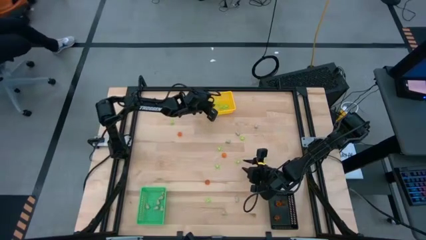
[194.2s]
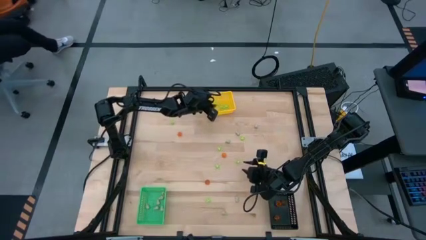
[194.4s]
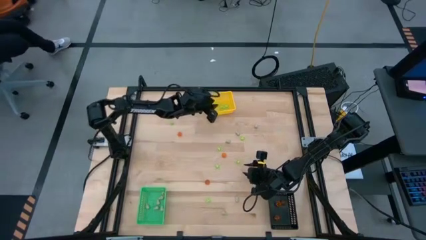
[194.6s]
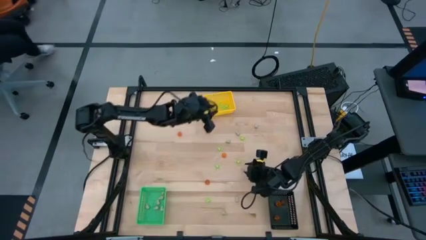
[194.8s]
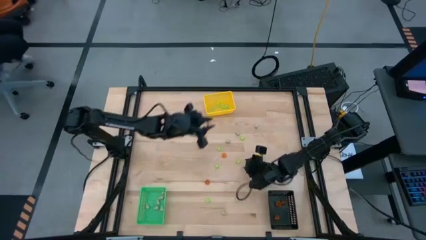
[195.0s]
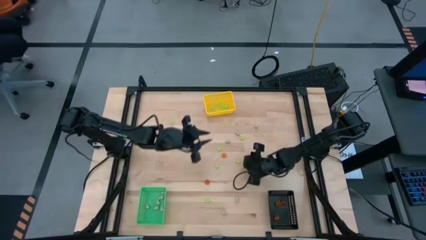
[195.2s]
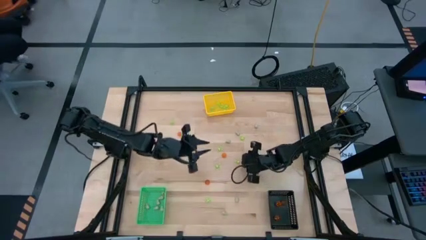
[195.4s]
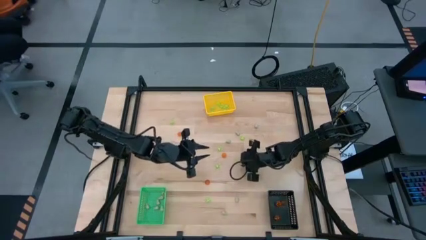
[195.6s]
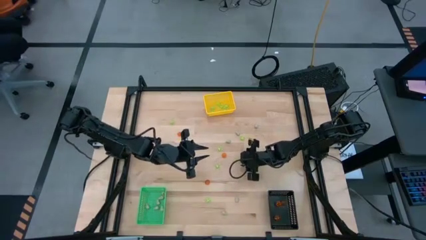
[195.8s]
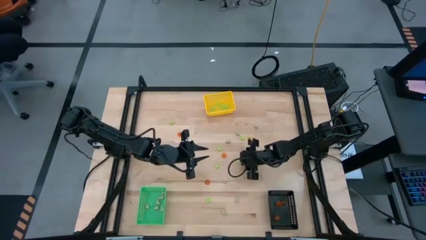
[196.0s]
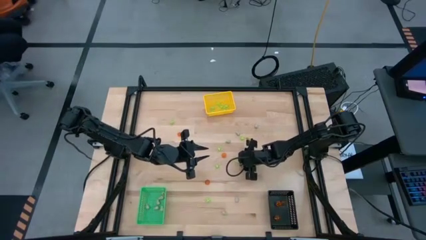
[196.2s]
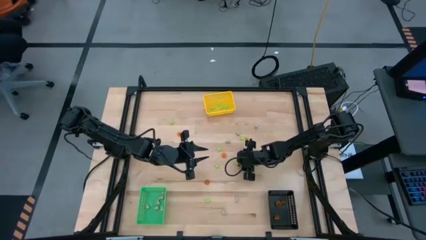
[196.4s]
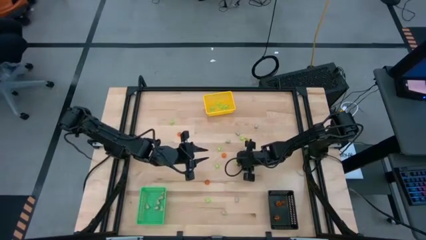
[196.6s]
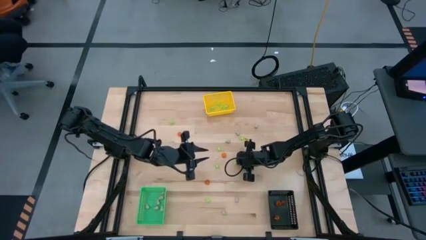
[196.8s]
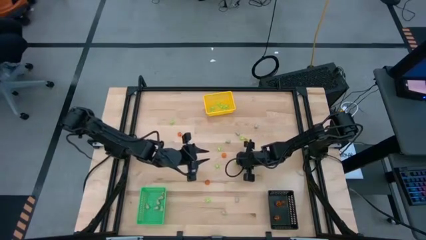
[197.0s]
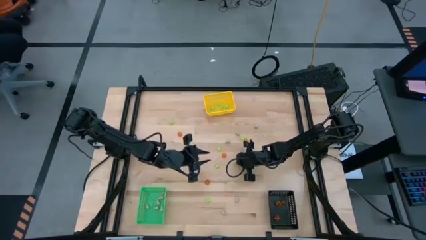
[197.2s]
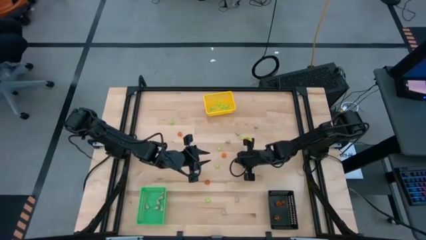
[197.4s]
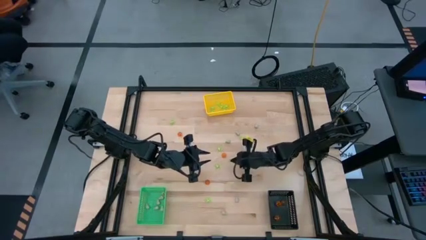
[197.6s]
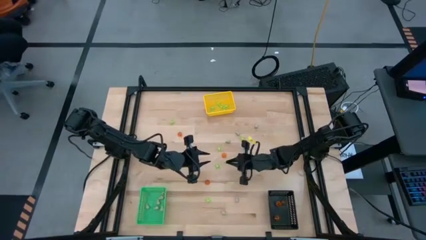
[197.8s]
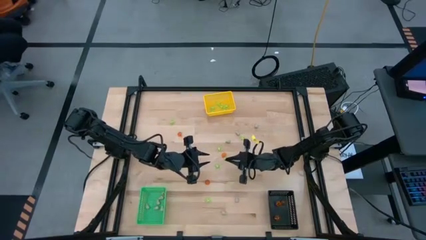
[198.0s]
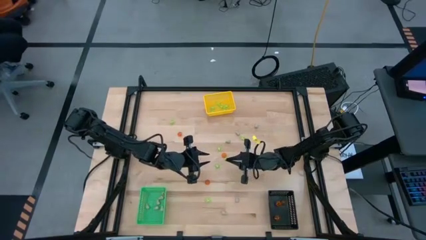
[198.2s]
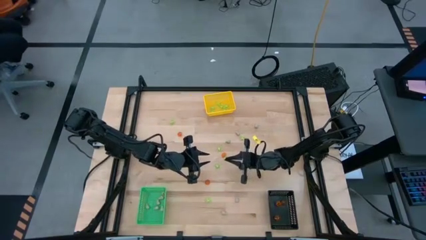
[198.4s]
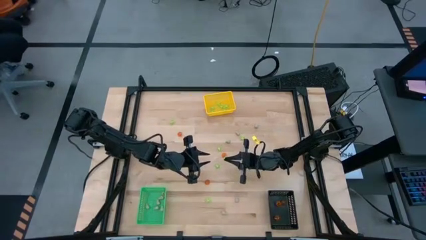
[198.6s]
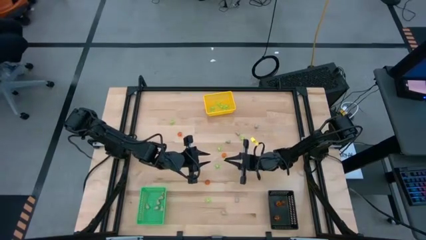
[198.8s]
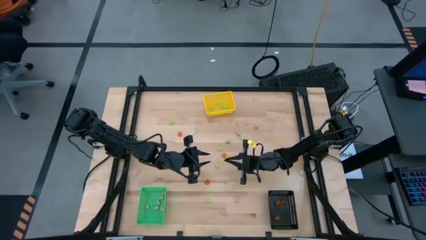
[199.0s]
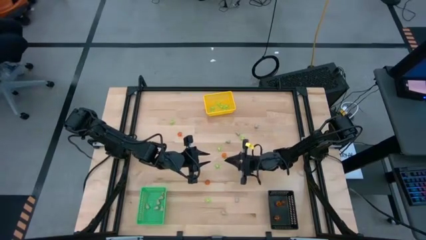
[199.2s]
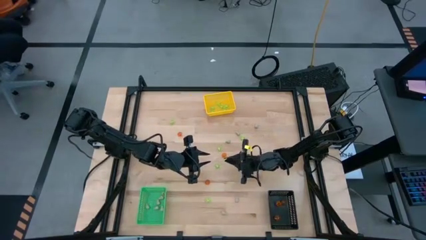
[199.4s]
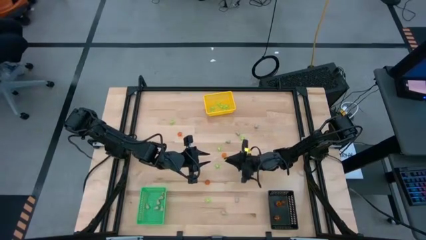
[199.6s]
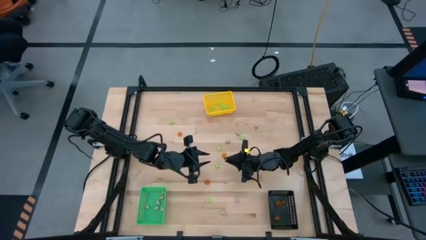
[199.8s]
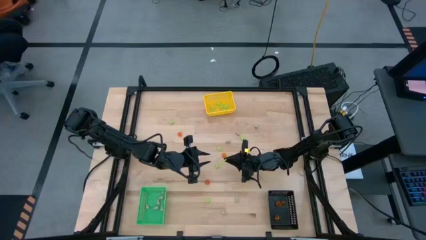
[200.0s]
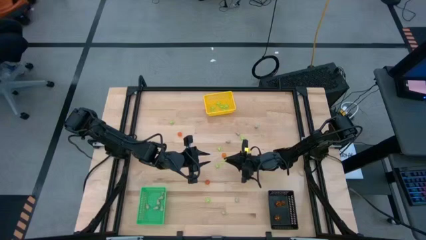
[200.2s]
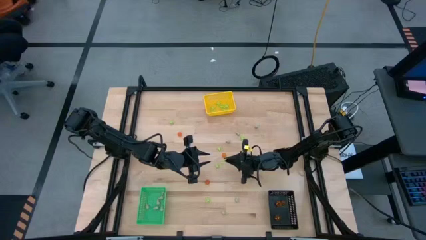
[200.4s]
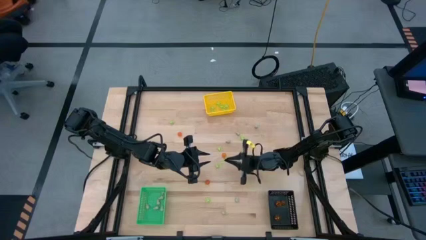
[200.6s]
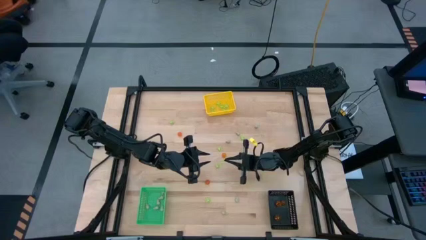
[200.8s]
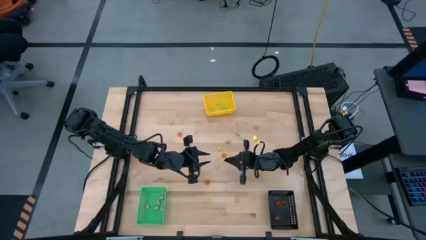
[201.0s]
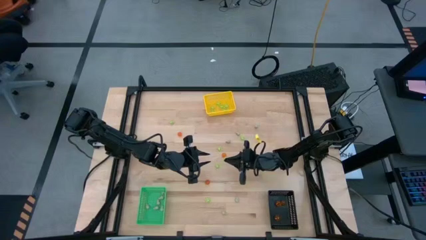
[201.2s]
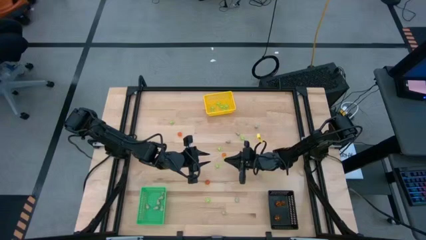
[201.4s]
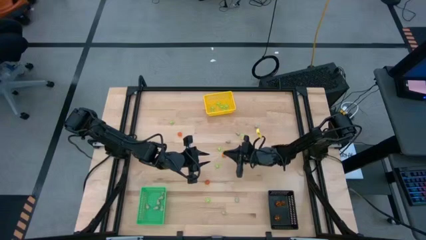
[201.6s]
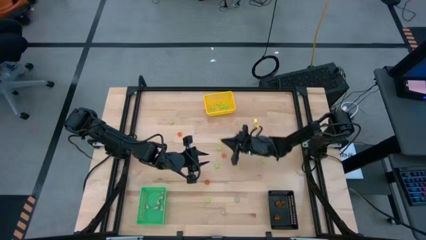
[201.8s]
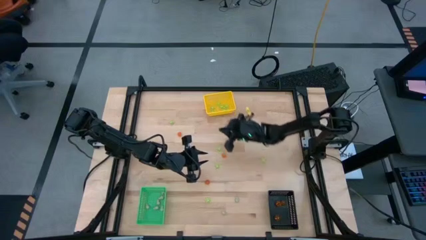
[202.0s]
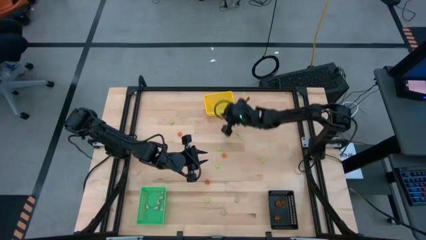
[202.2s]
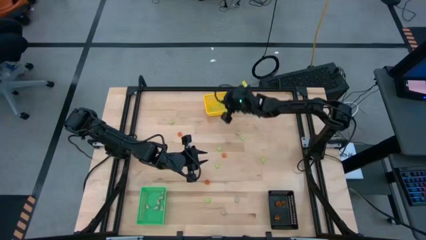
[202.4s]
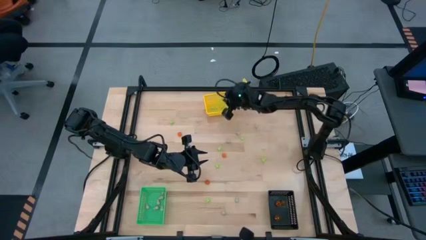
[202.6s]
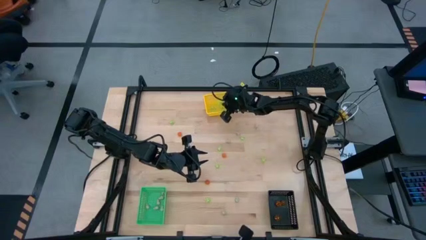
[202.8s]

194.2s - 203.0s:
Task: Sort Halloween decoration
Put the green spider toy into the yellow bin

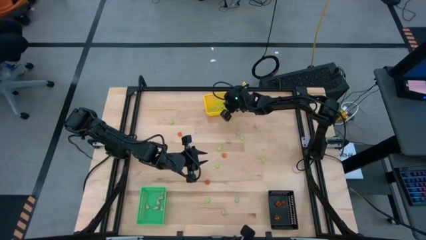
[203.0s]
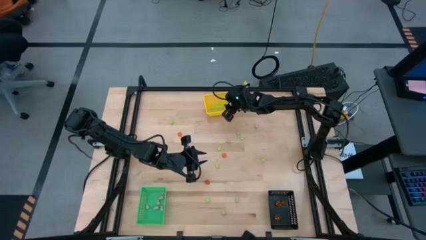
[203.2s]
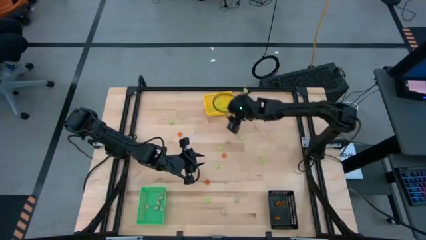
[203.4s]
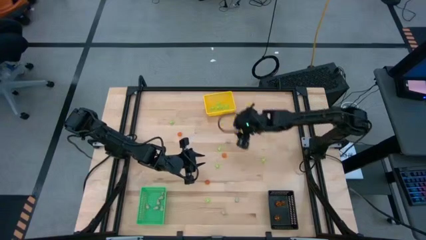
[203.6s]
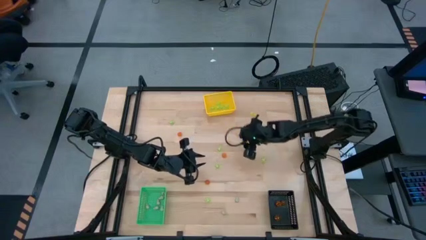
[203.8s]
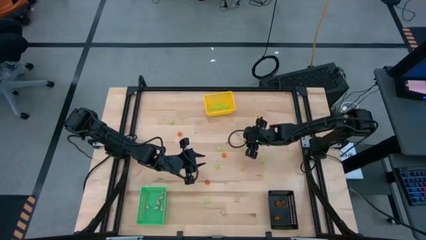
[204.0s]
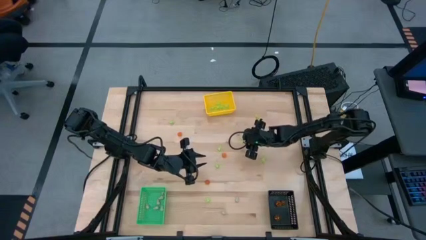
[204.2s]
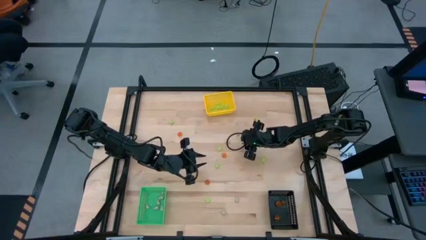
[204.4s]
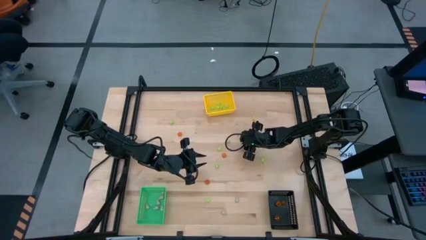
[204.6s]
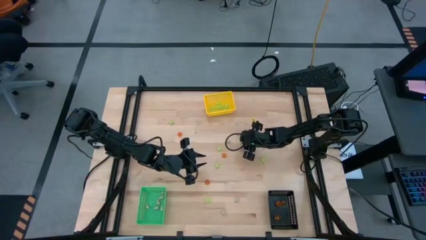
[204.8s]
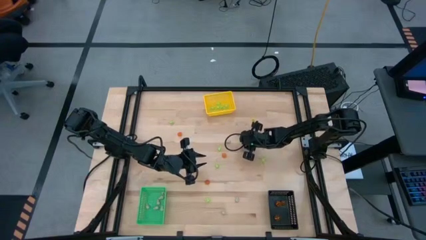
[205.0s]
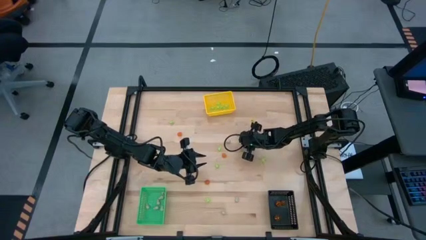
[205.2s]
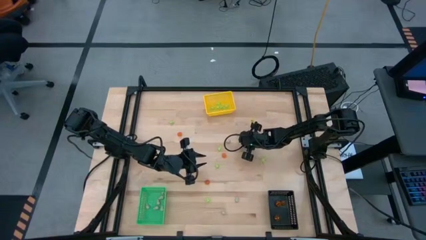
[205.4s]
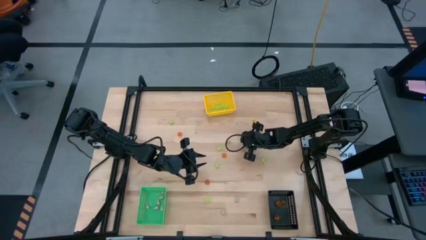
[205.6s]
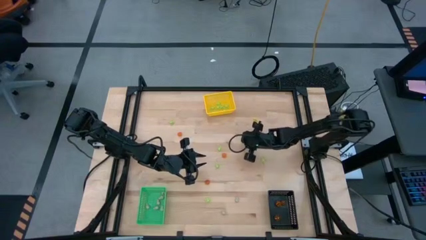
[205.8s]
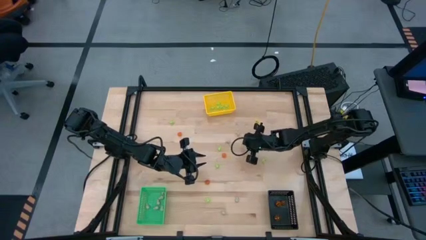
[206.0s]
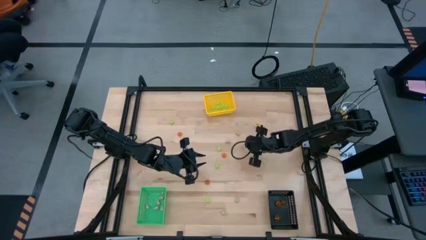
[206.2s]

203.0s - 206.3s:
Put the green spider toy into the yellow bin

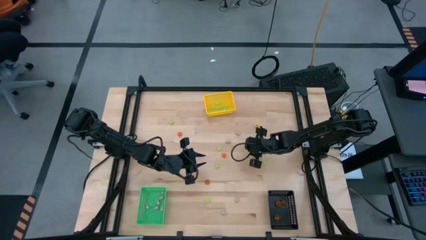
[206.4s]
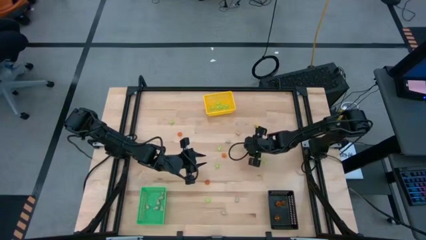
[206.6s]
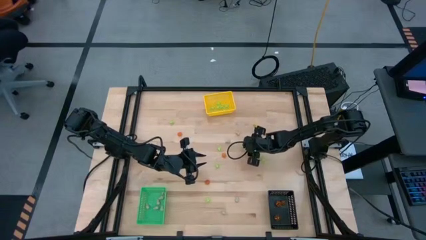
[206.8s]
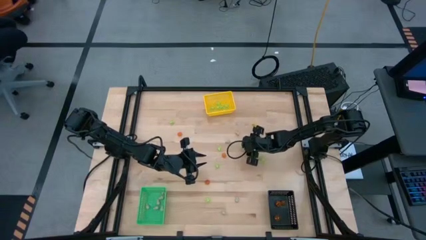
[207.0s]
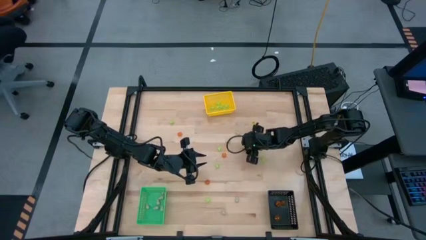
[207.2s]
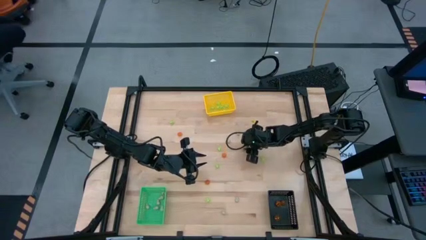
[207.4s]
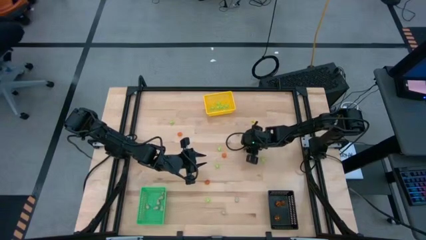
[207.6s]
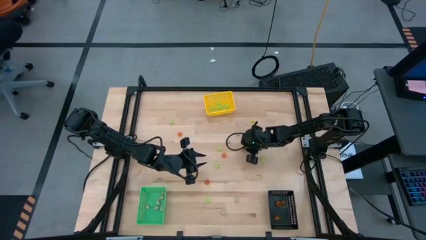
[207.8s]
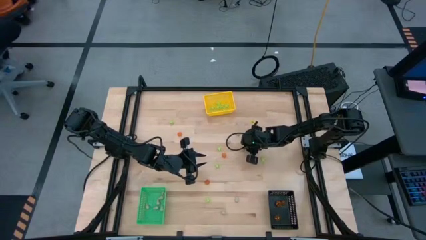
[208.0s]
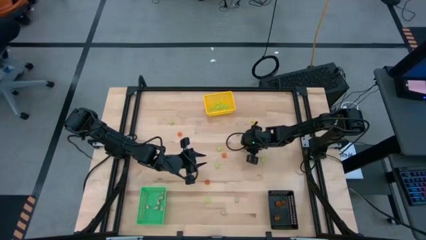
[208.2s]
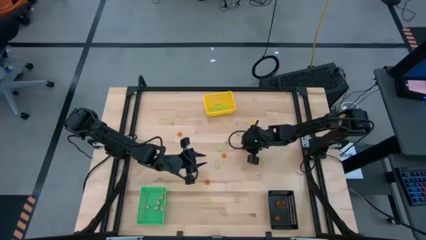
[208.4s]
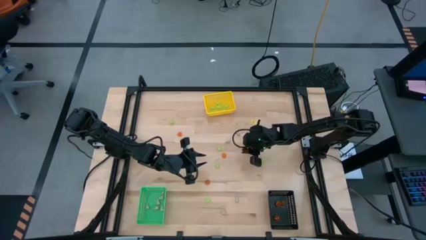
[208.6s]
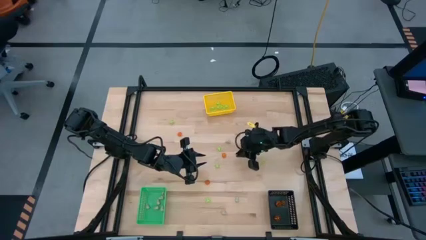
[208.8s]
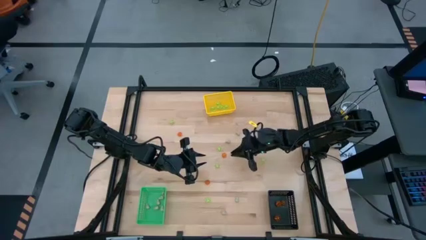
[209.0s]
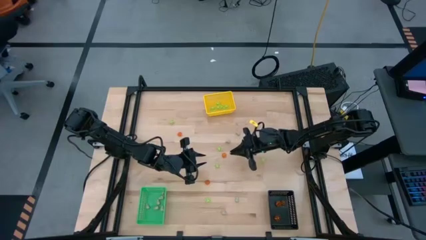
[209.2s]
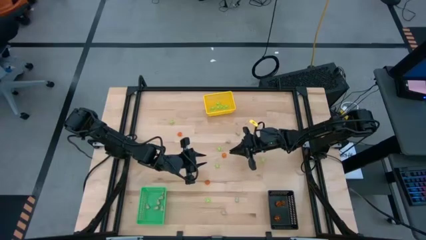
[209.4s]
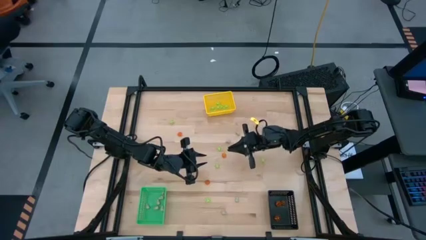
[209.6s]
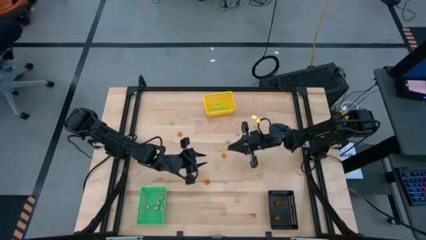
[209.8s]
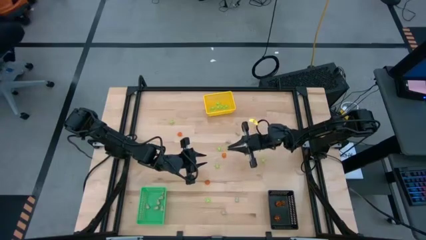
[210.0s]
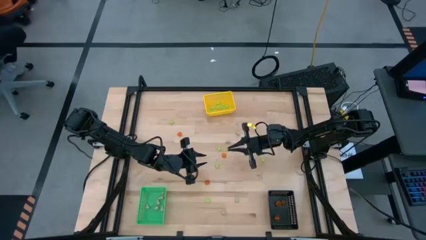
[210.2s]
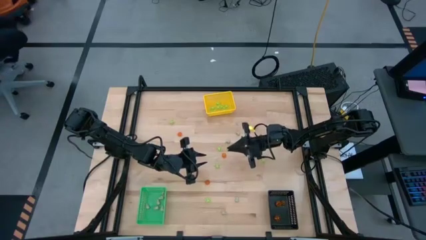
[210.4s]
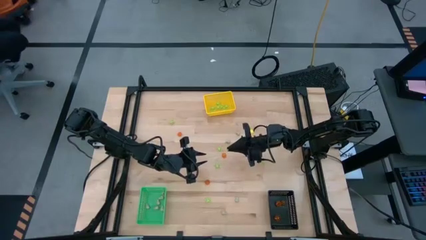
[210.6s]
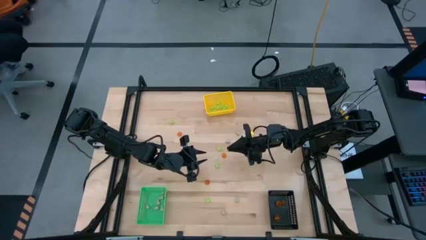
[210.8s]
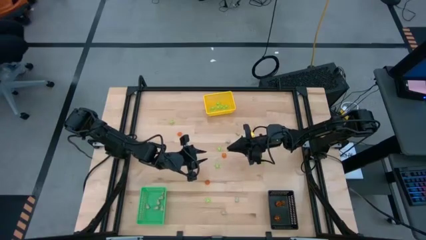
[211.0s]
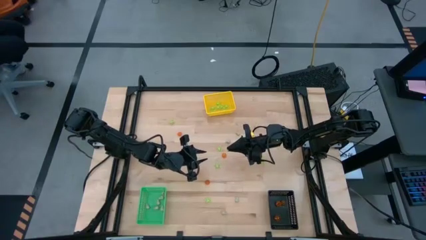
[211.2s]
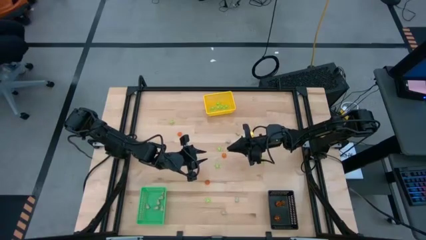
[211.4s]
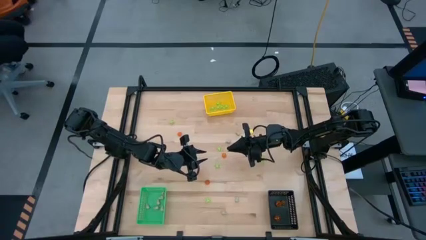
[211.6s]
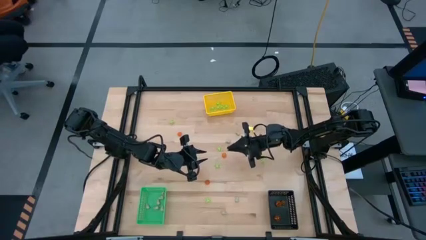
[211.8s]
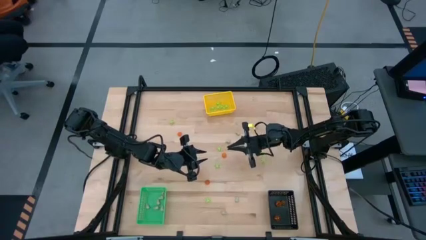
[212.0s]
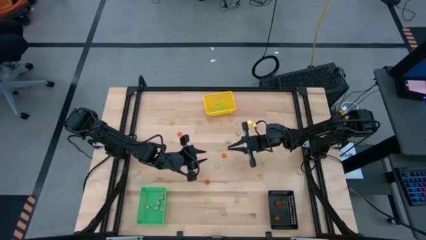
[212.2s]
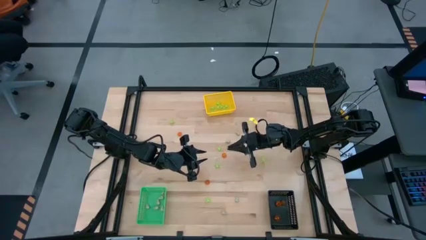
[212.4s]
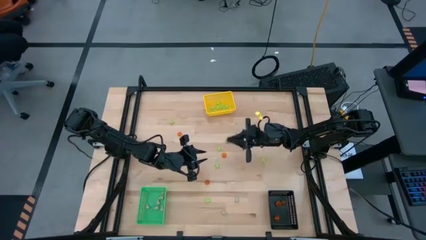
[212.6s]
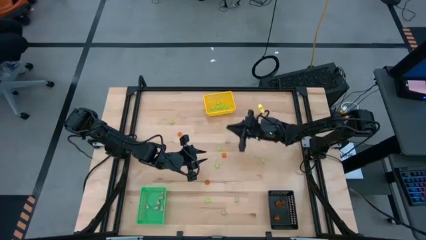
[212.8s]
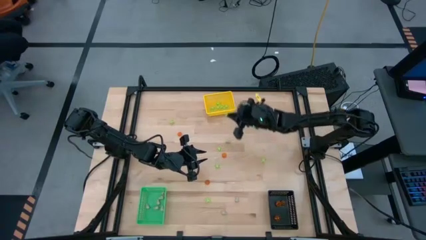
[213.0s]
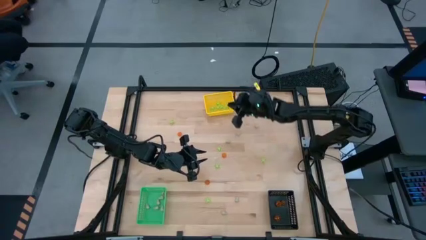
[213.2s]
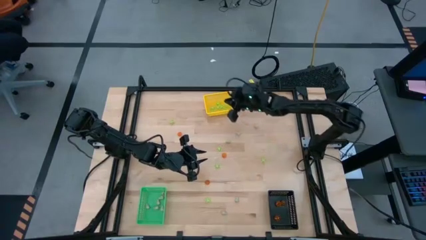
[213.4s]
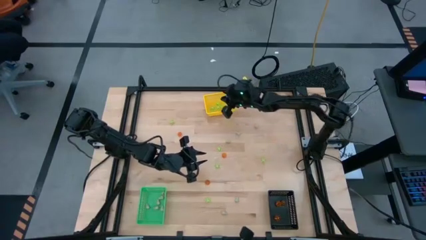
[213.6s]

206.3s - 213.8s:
Put the green spider toy into the yellow bin
